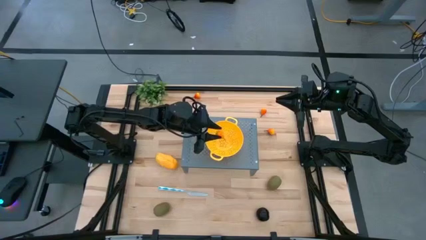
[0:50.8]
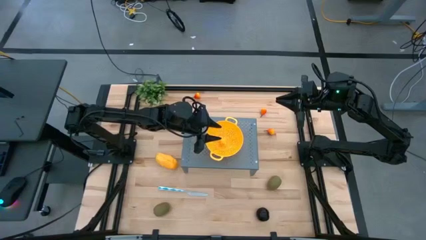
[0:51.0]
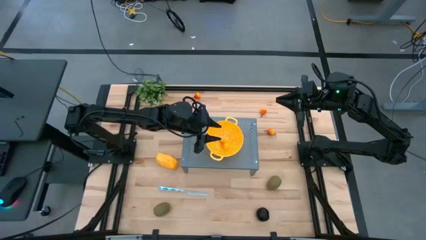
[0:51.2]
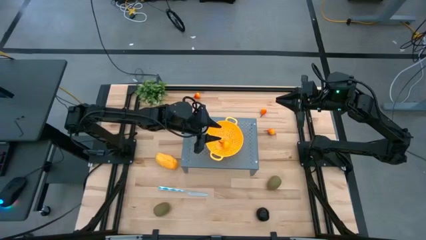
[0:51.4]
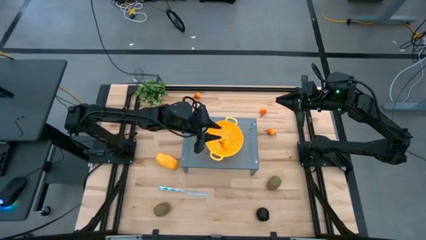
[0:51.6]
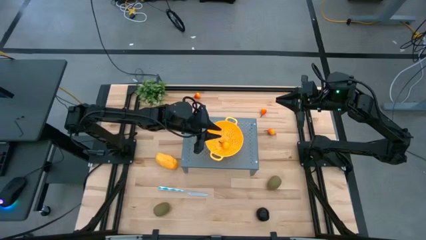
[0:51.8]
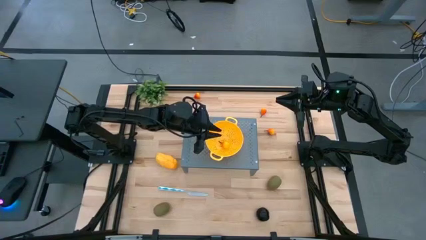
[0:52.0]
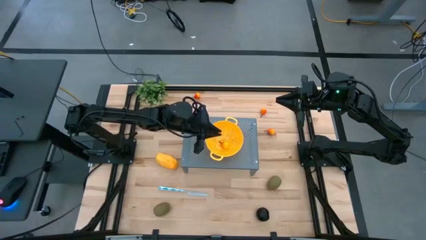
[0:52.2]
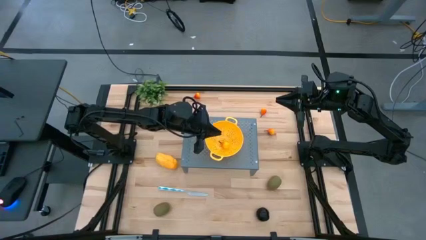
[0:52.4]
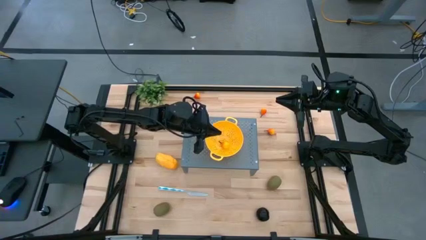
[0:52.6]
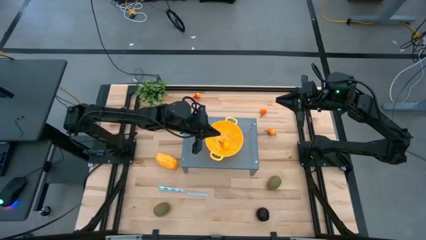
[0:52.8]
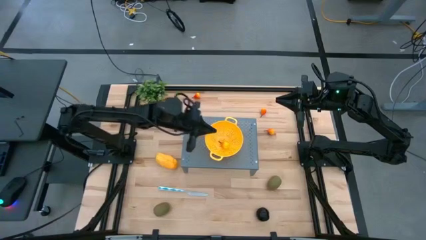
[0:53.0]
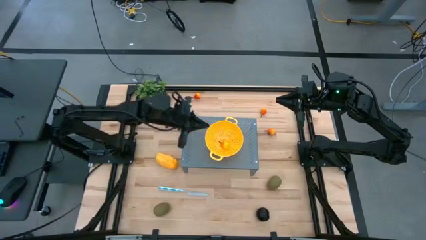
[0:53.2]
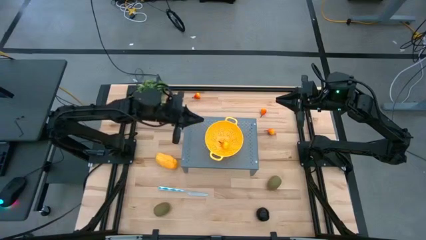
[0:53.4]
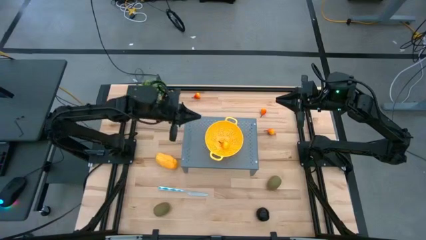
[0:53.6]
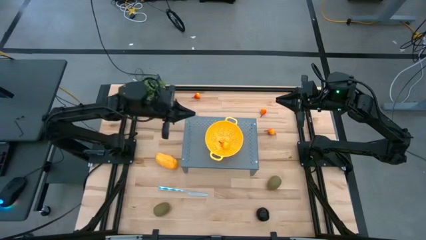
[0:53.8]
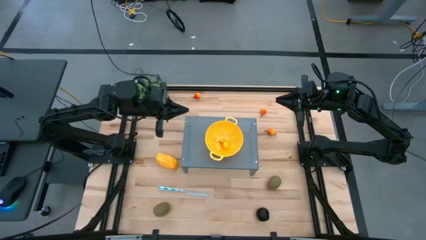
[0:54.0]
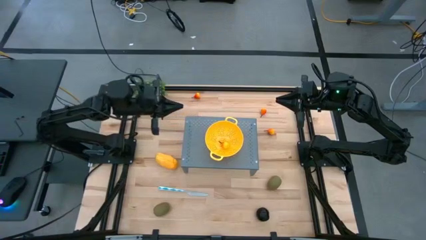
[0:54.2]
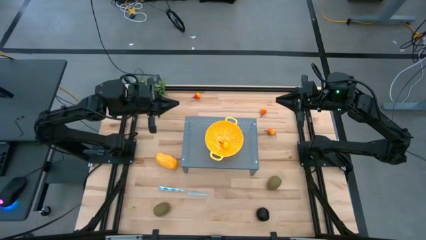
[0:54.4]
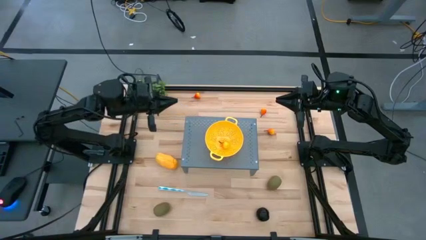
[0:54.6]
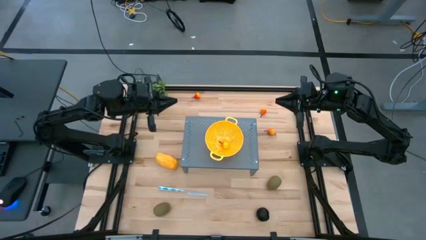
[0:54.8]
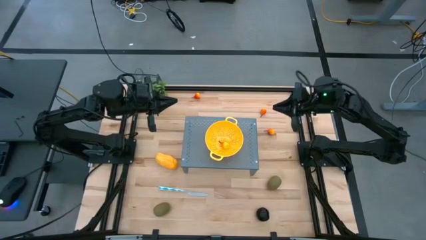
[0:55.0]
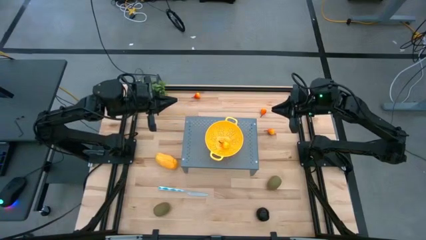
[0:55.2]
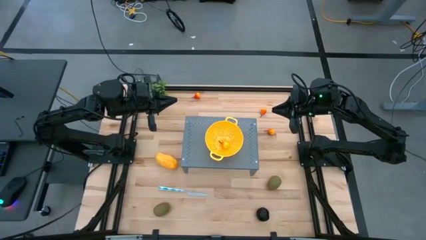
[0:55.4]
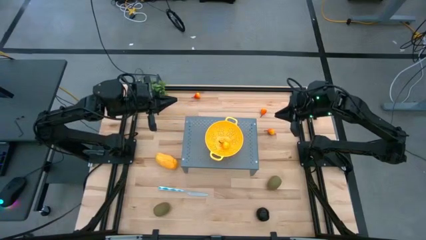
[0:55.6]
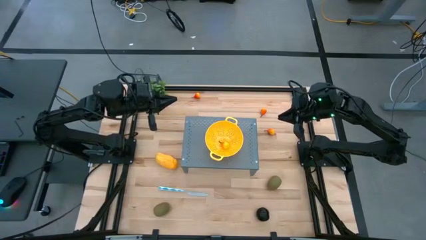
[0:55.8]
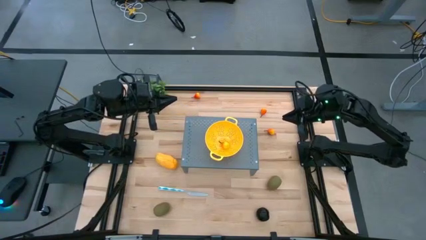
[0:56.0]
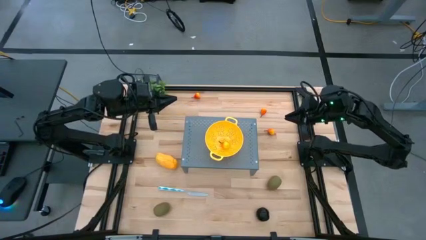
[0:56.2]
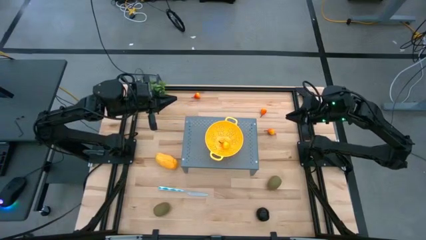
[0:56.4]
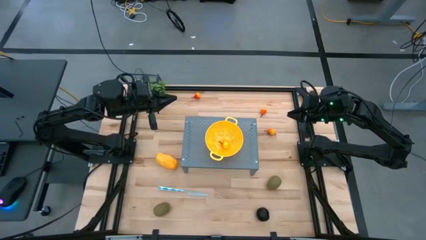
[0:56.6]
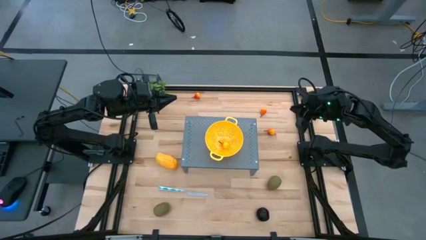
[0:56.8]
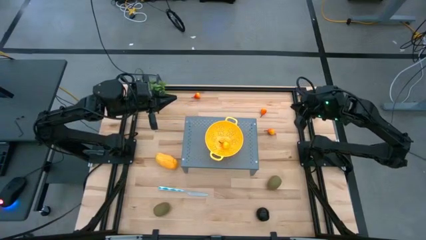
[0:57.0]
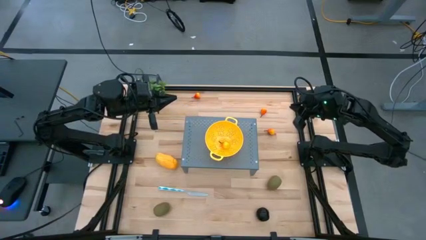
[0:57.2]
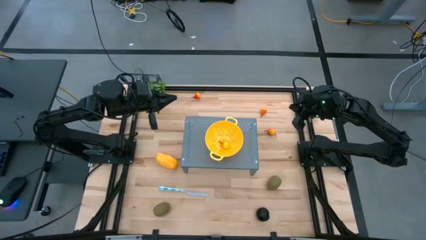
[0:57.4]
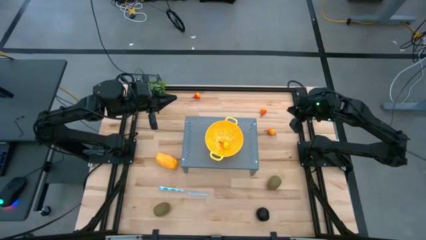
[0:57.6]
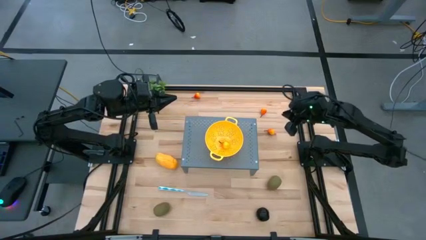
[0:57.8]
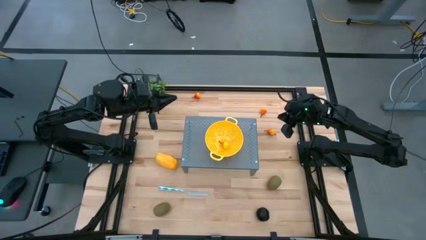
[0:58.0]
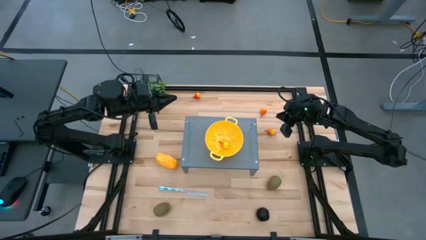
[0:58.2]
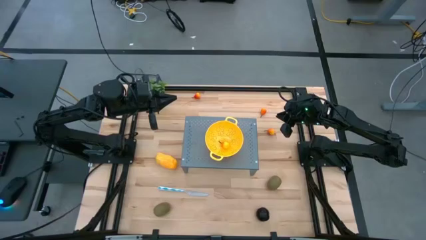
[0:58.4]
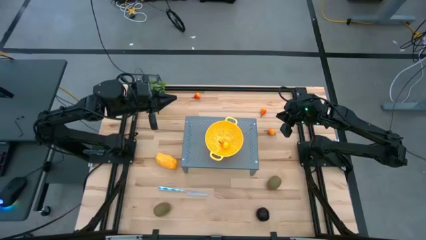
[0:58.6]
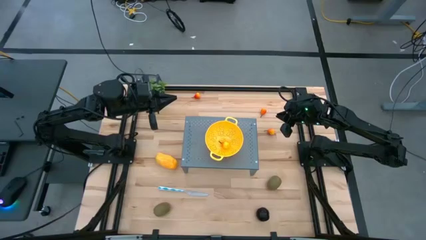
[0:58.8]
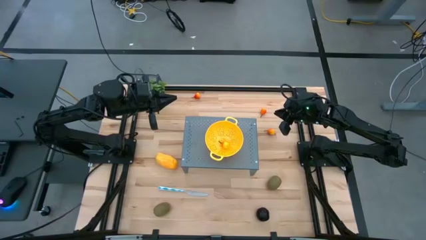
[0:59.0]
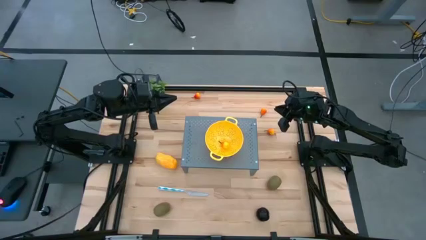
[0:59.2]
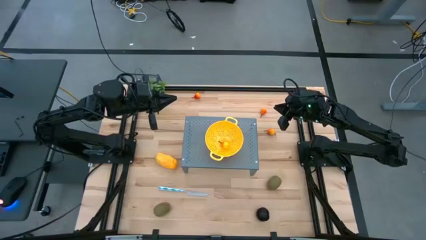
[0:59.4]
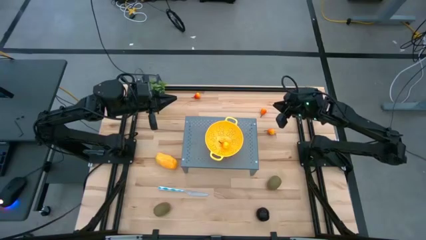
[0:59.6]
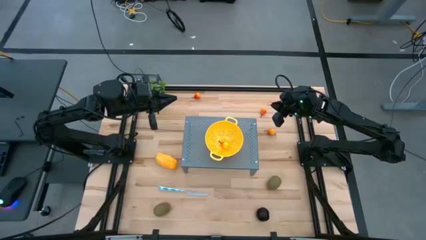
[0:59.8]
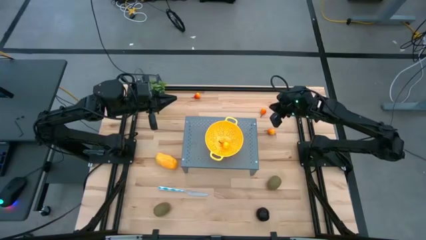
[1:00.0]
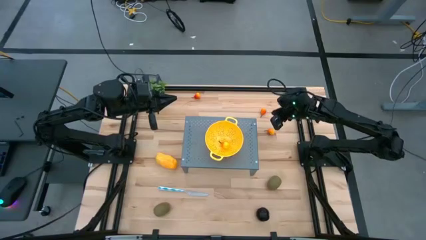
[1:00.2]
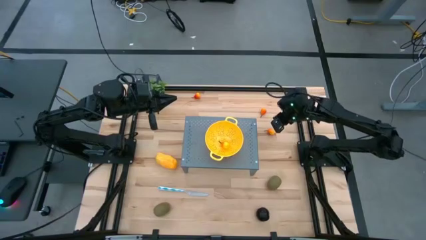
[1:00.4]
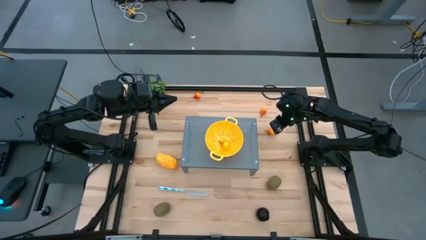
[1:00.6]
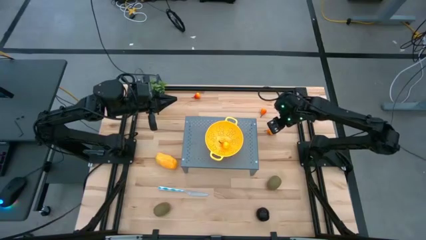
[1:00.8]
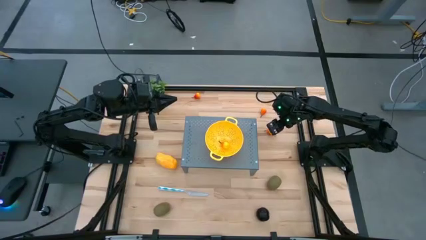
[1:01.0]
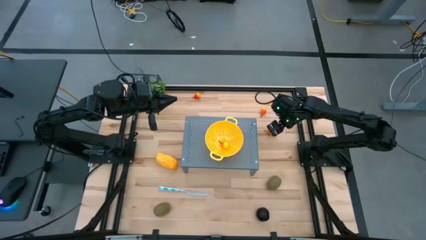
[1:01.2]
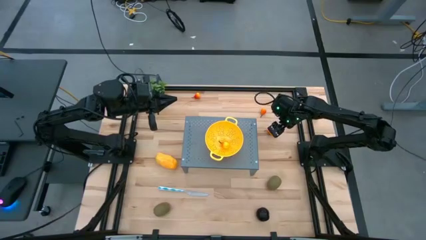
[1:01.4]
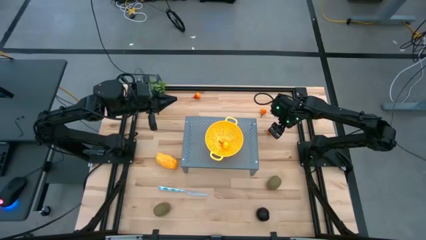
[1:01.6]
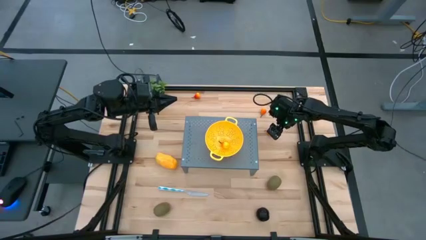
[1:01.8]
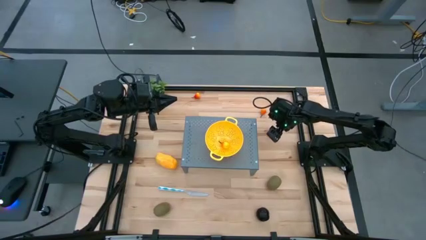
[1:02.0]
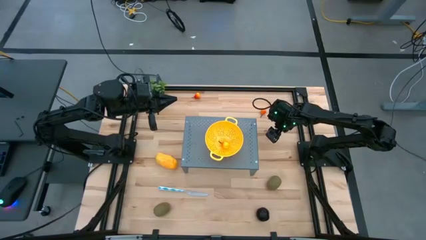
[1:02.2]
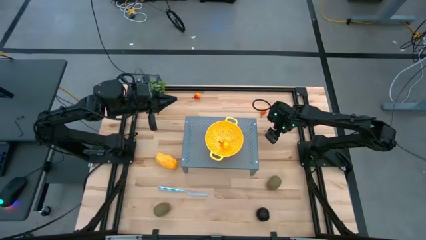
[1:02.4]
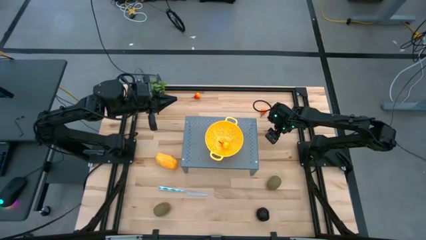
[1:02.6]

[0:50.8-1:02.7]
Task: Pick & Place Fruit
Put the right bottom pear into the strainer bowl on the shelf

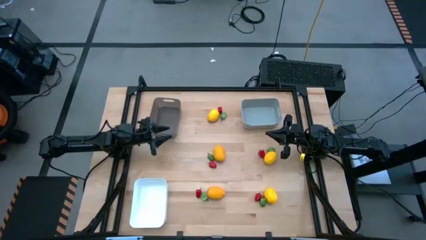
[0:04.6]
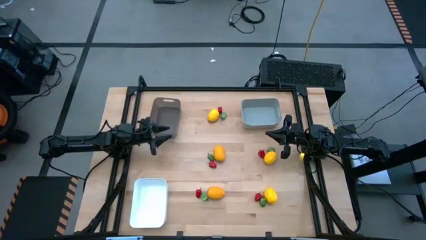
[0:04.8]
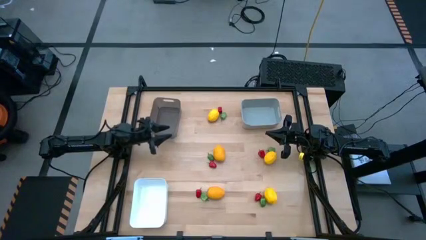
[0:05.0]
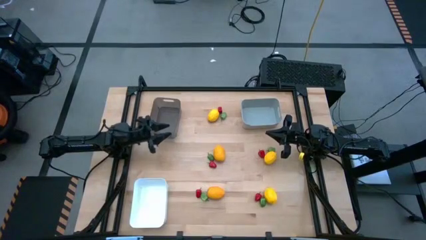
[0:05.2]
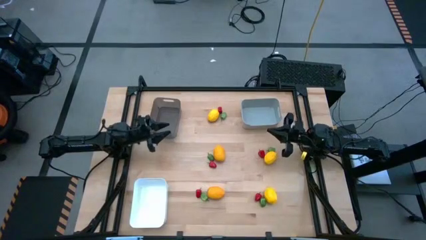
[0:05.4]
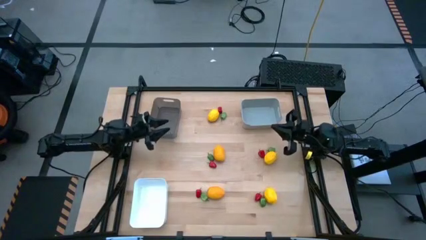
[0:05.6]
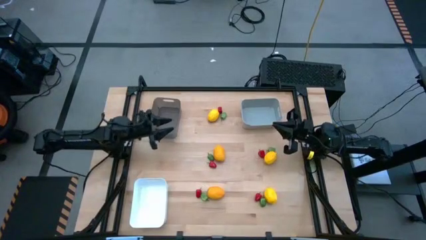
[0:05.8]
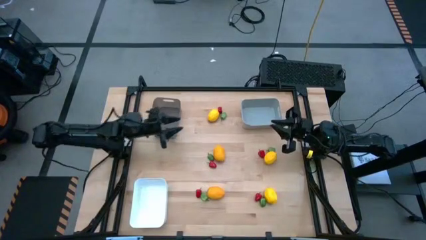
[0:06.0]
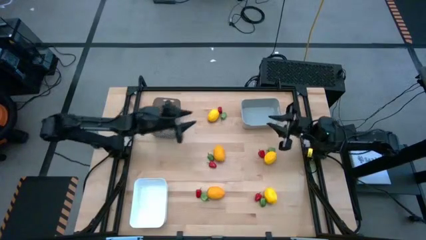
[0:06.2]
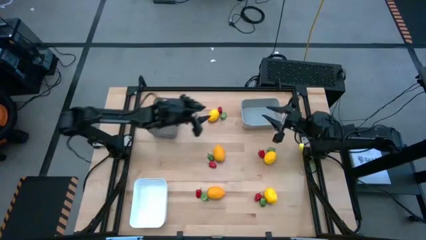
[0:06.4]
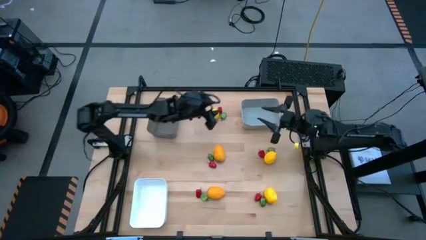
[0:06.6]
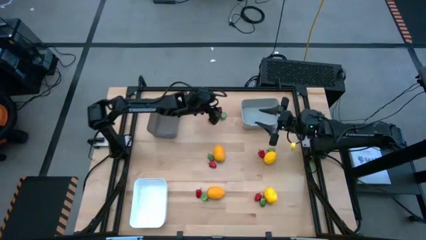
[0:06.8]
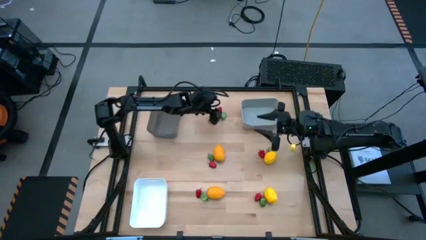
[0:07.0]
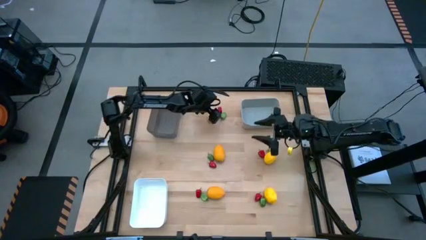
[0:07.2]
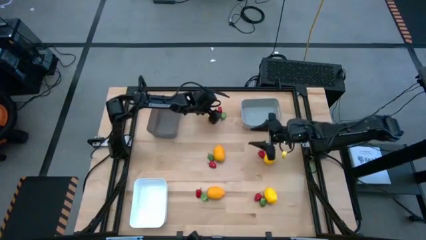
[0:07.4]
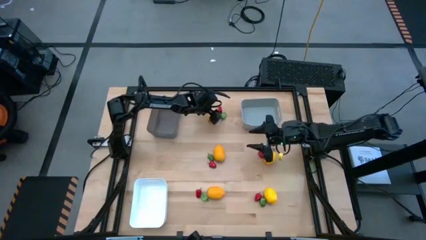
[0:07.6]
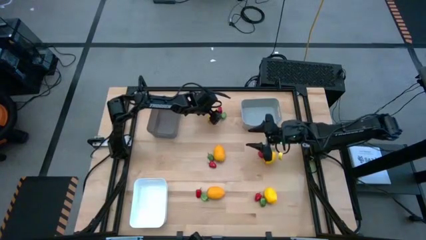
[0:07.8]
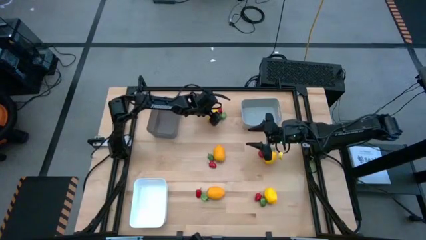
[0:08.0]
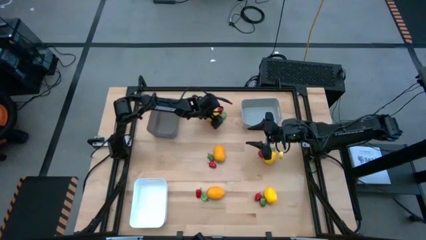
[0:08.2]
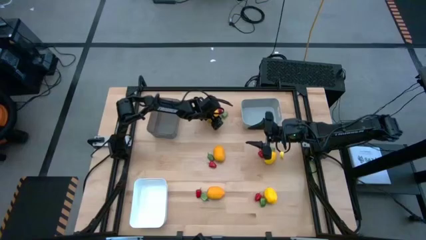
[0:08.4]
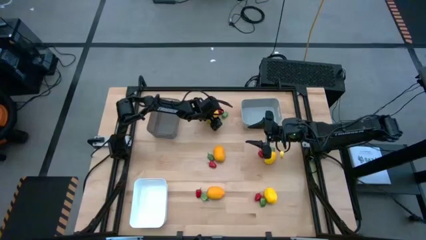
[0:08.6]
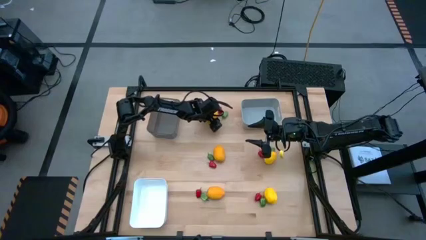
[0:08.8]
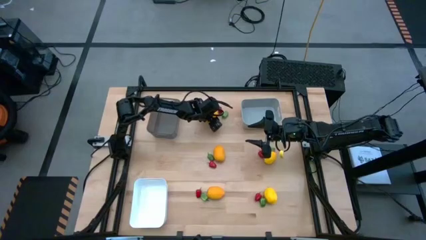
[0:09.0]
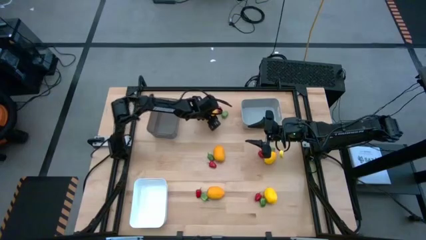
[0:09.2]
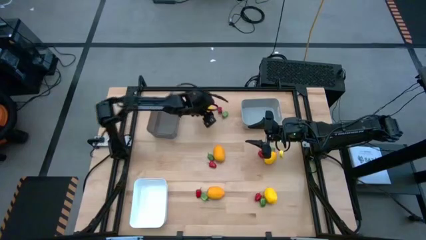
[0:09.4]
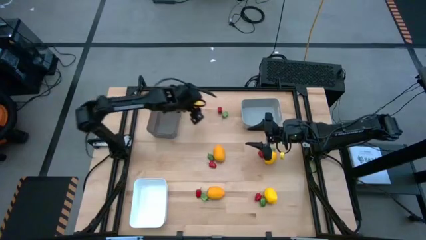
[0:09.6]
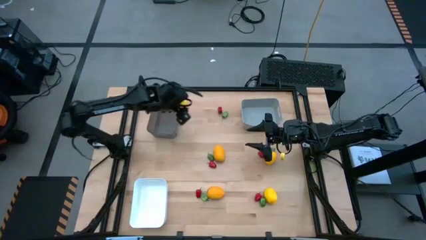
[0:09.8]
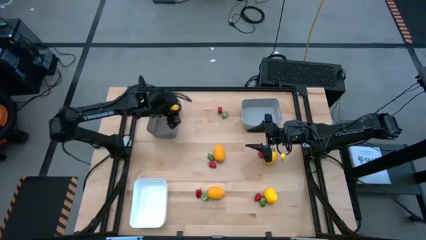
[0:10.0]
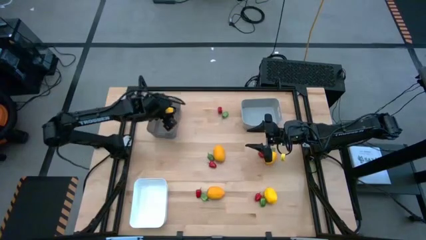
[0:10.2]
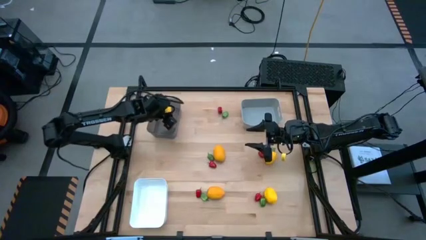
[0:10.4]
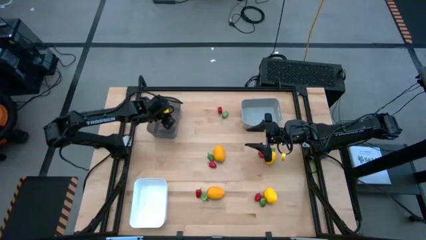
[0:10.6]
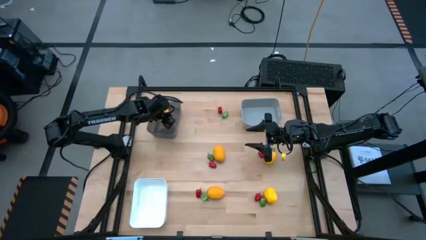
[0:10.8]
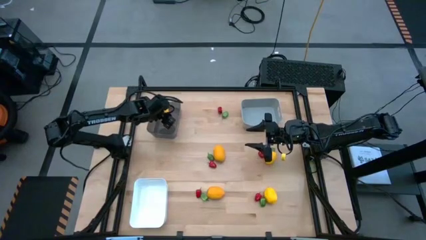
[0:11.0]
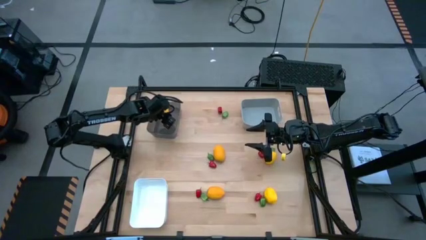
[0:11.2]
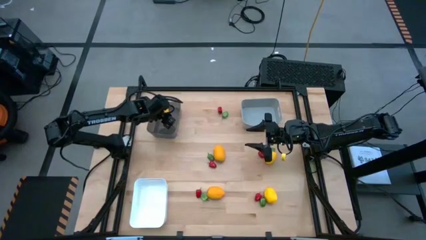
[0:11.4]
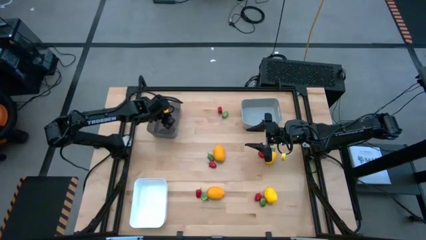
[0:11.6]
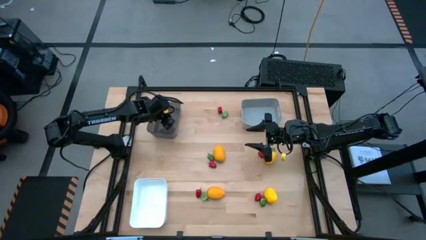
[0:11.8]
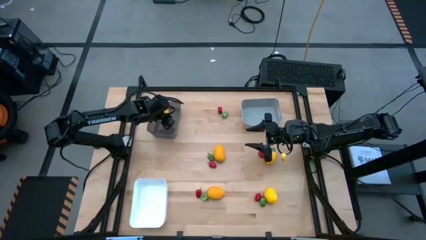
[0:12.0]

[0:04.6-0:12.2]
Task: Sort produce into baskets
Put the lemon into the black bin
